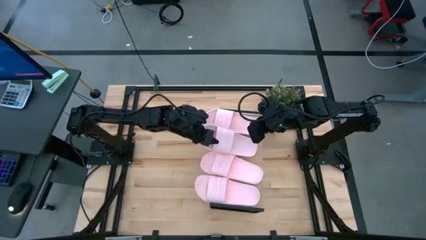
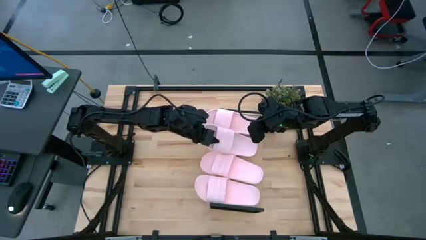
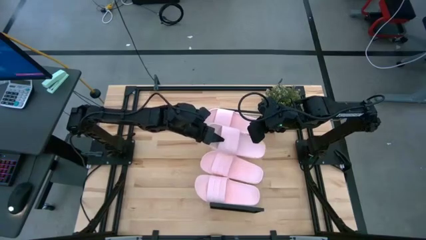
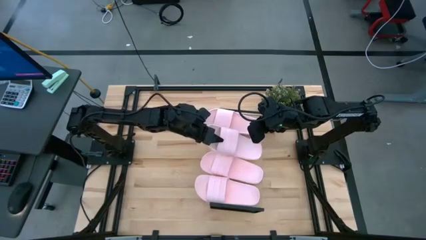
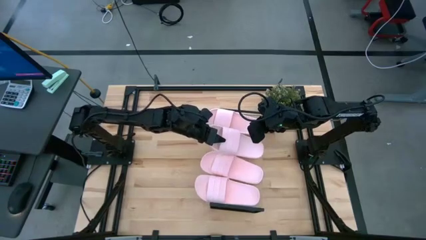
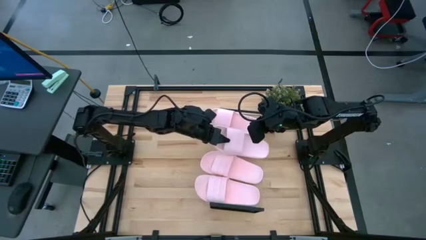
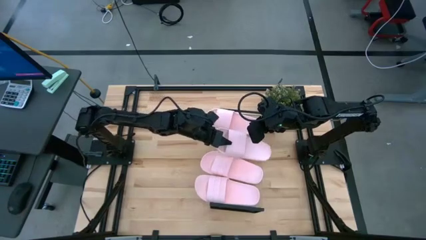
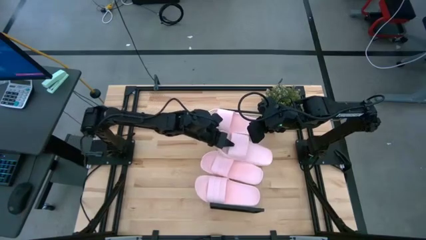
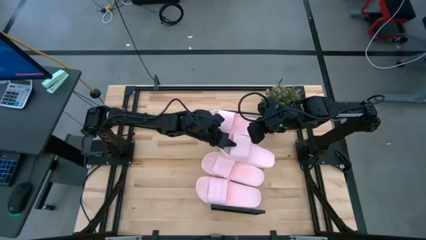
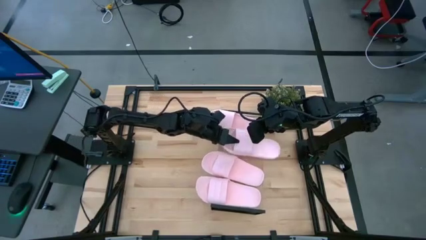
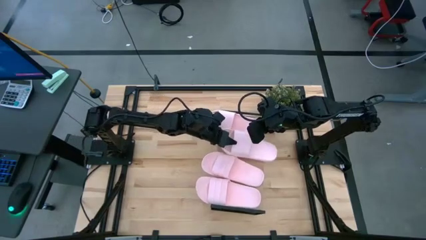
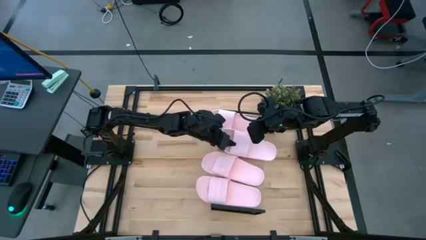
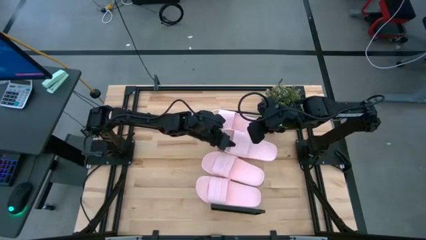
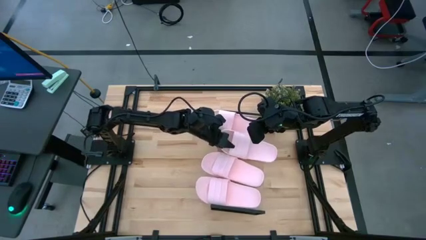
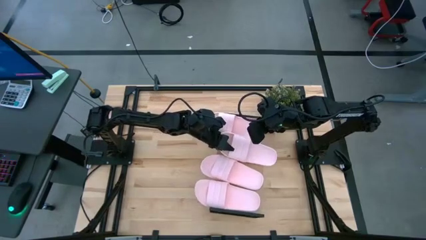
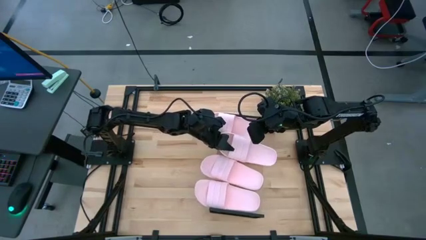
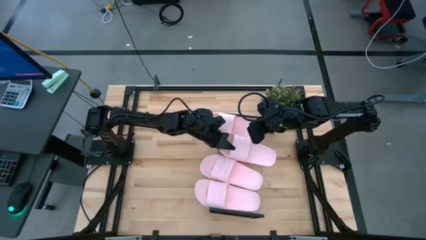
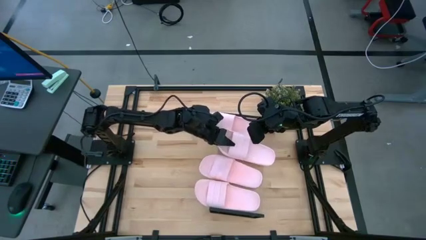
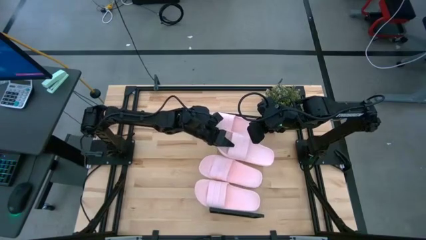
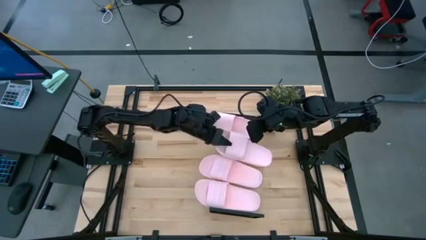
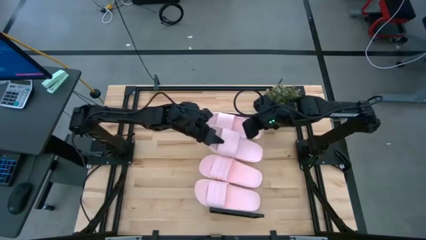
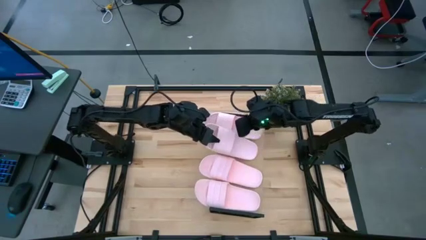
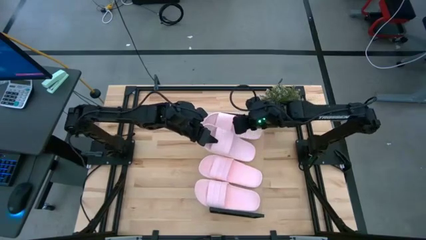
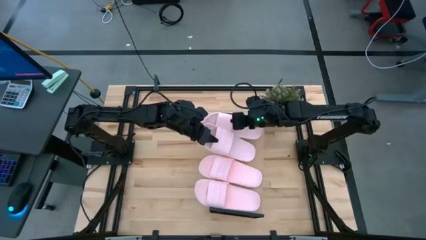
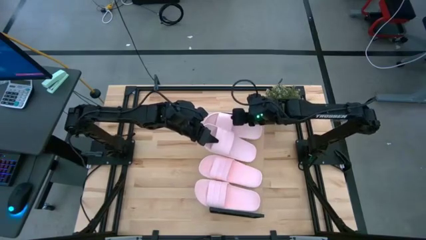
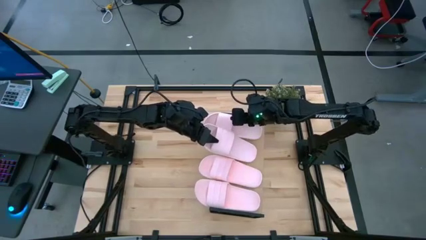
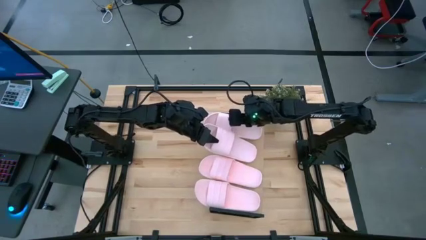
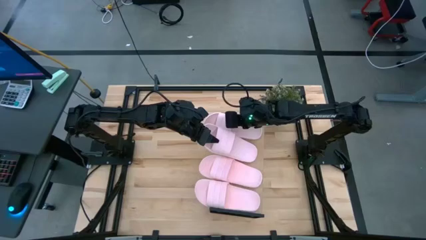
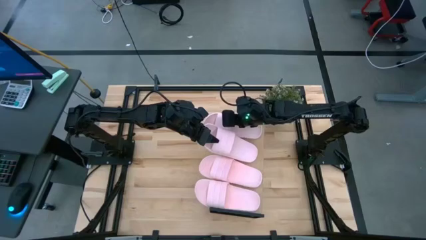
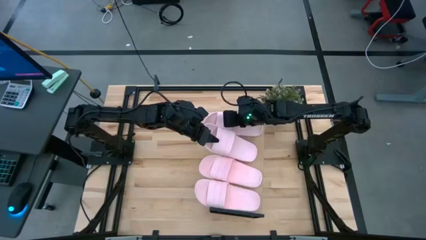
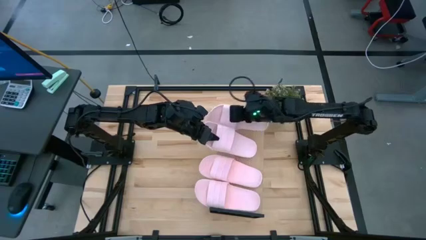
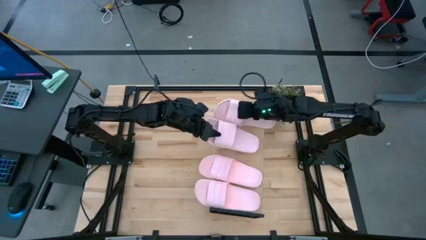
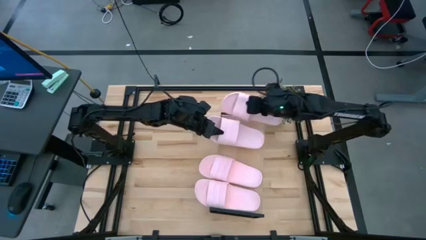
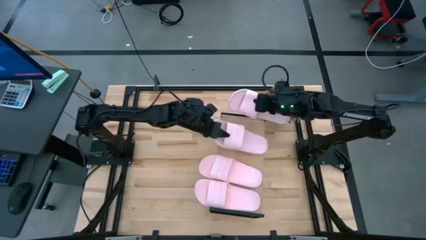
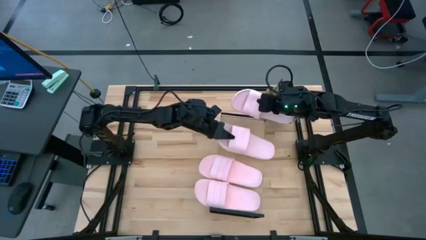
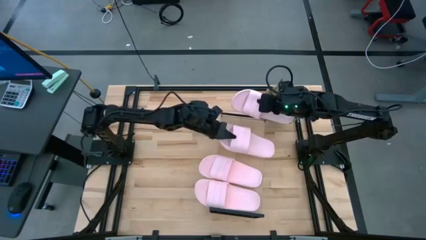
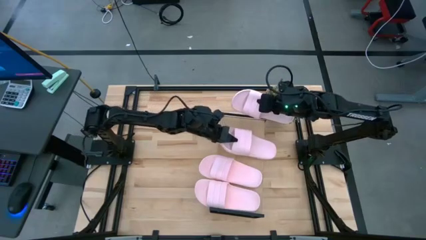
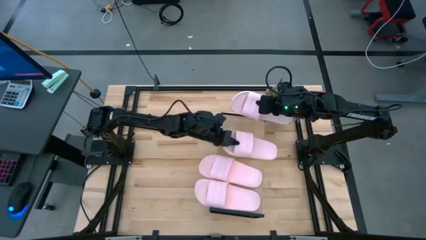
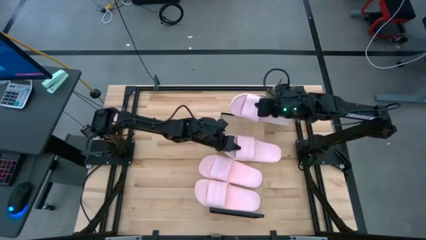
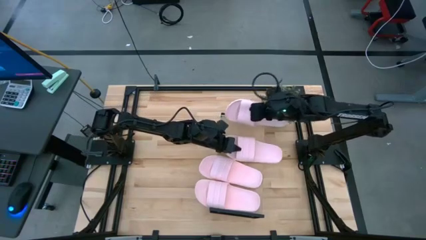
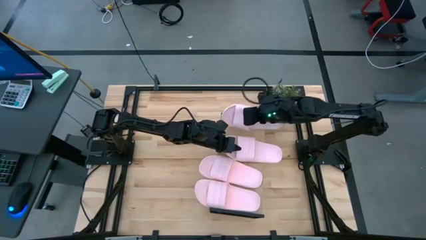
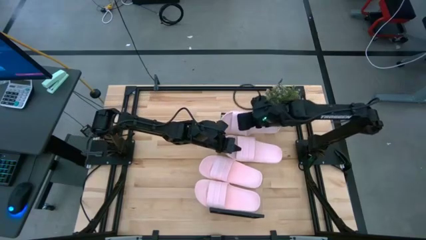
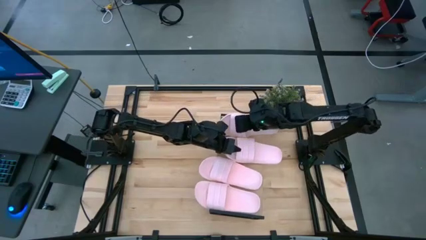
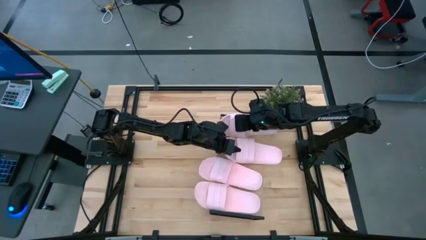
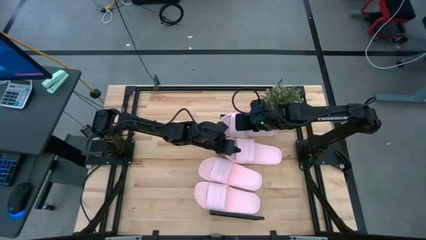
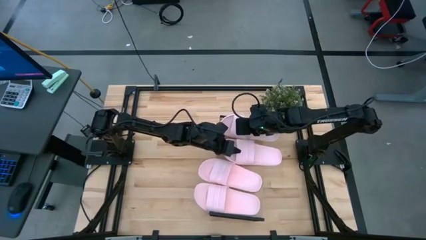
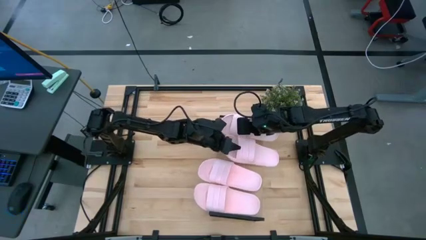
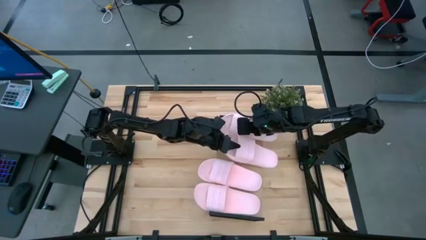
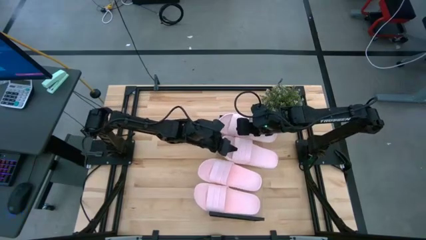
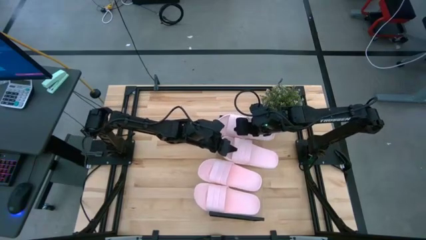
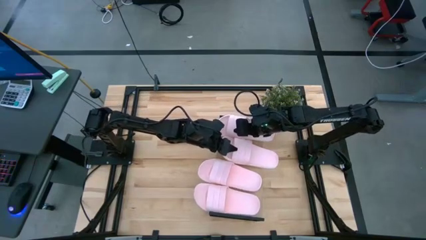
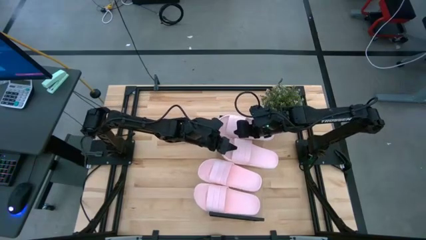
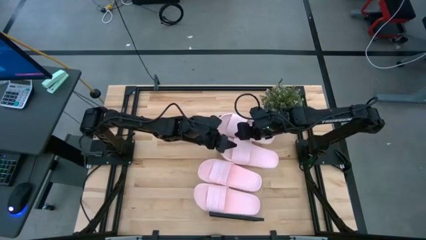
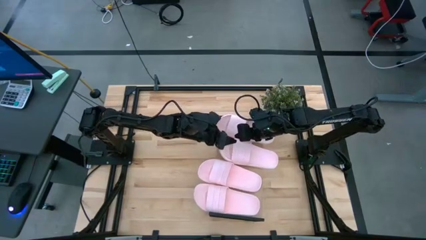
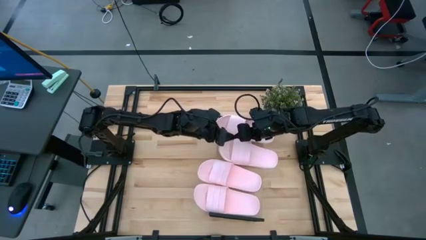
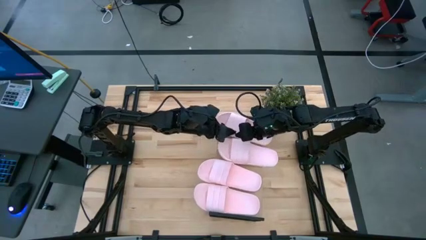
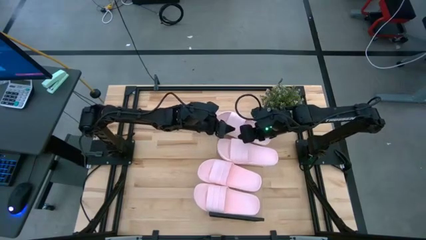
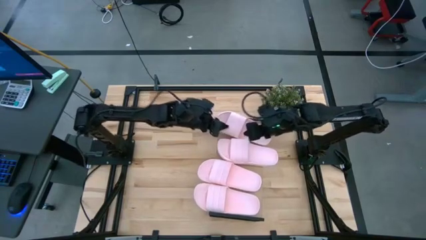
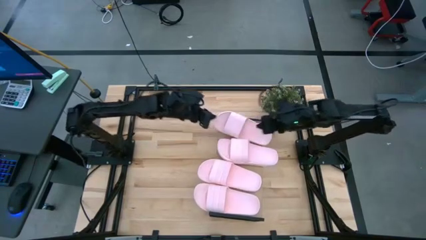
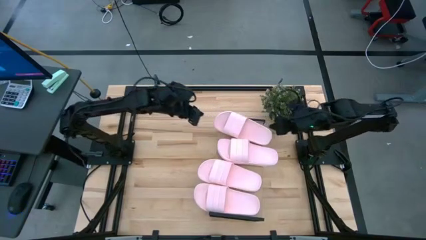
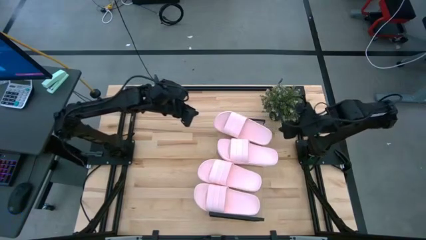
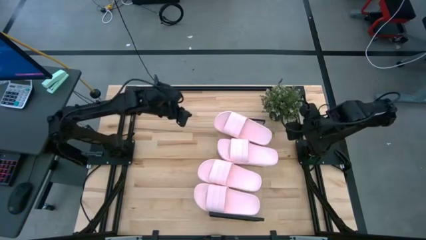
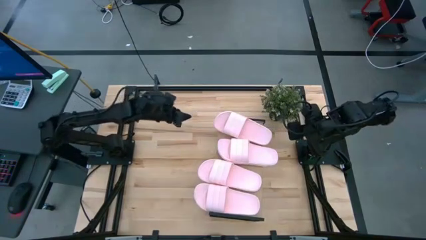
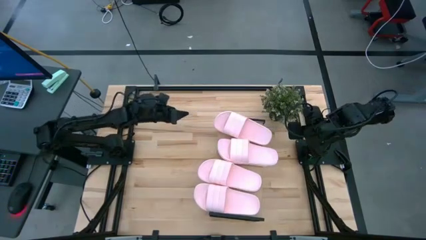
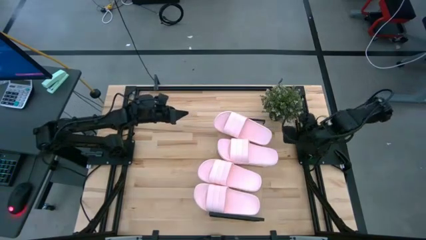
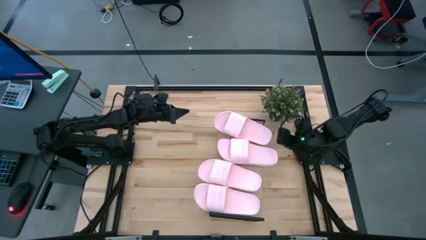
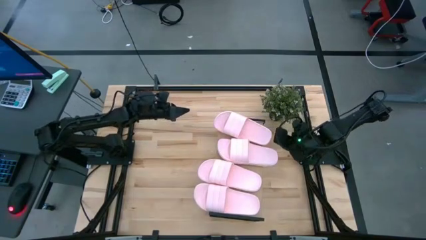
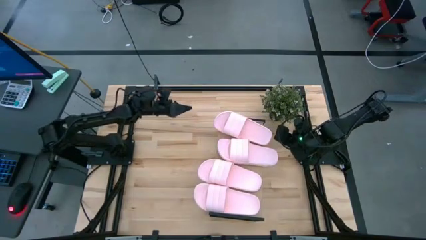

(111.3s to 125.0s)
Task: Pick and place slides into the shelf
Adjust the pink slippers on the shelf
